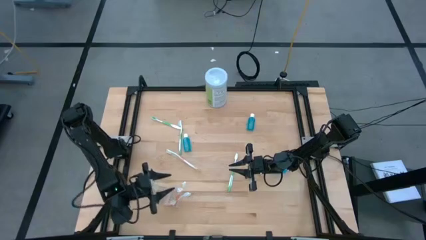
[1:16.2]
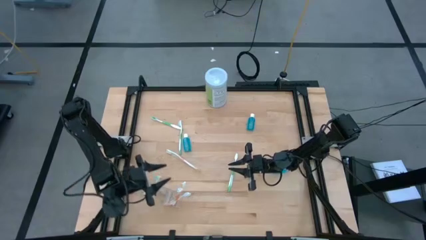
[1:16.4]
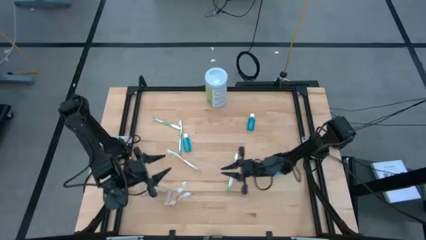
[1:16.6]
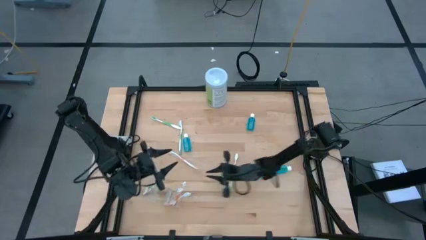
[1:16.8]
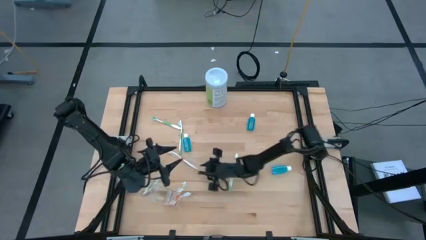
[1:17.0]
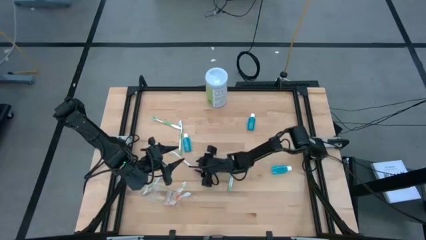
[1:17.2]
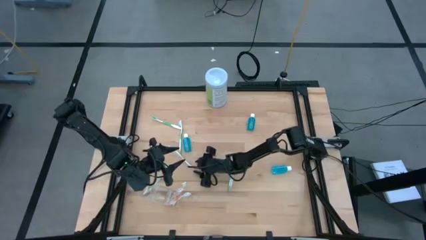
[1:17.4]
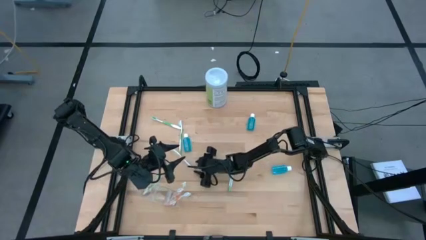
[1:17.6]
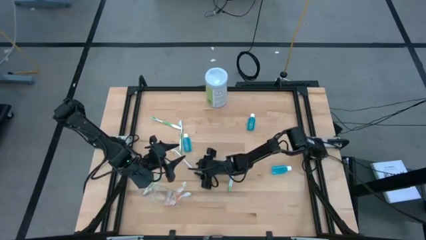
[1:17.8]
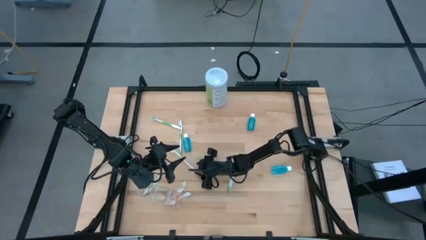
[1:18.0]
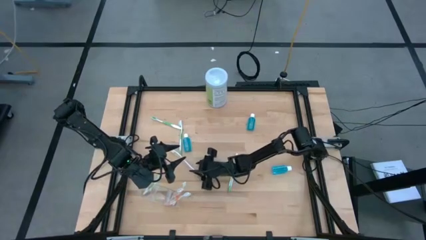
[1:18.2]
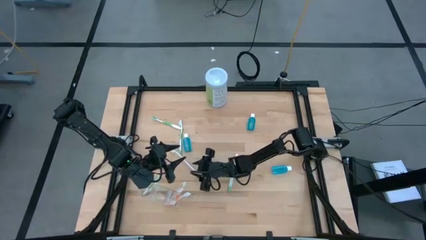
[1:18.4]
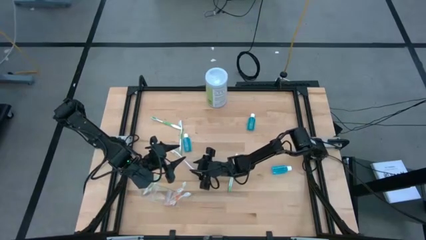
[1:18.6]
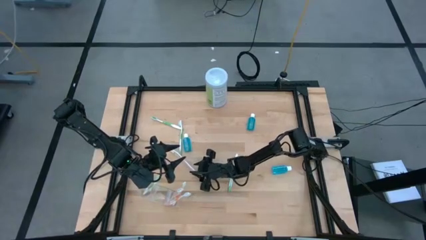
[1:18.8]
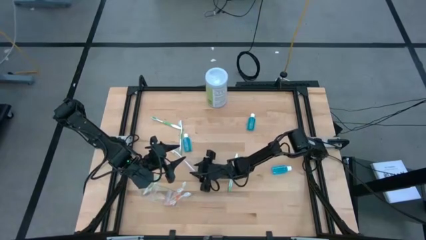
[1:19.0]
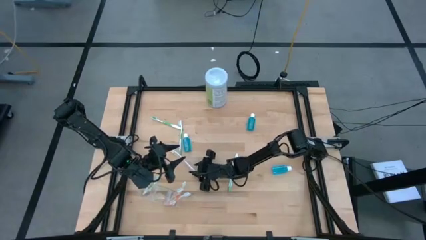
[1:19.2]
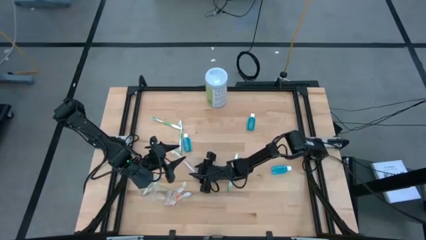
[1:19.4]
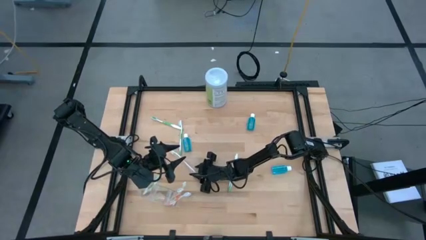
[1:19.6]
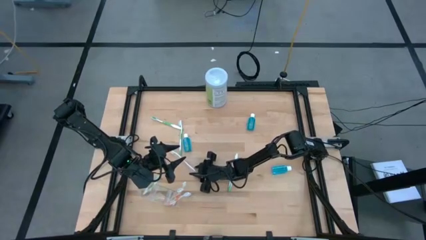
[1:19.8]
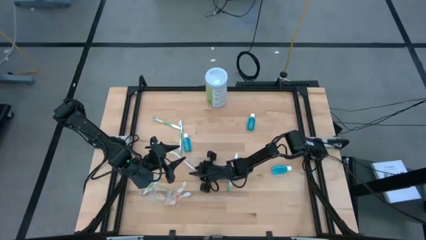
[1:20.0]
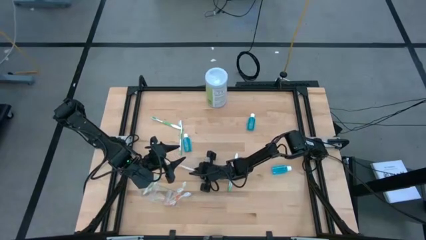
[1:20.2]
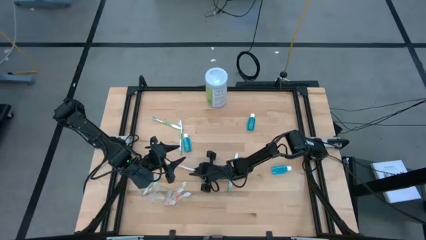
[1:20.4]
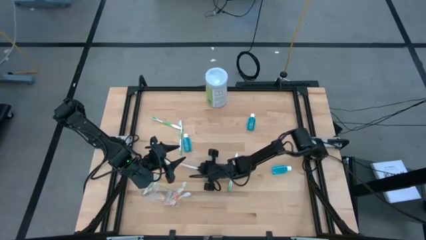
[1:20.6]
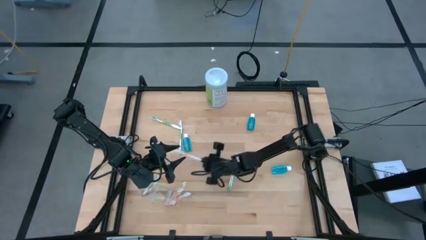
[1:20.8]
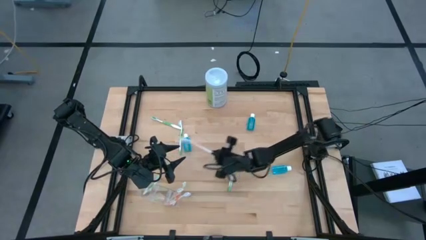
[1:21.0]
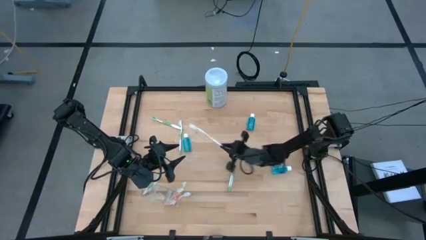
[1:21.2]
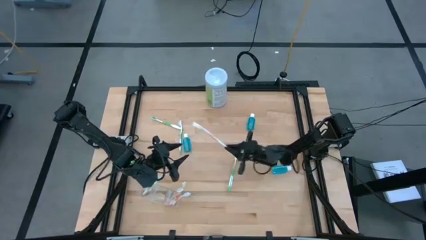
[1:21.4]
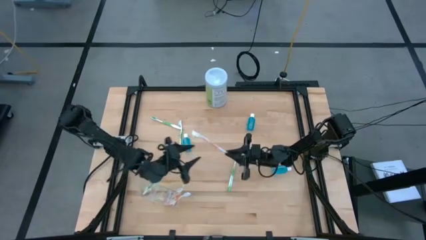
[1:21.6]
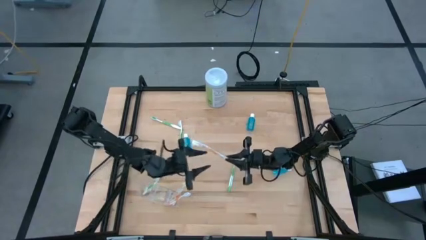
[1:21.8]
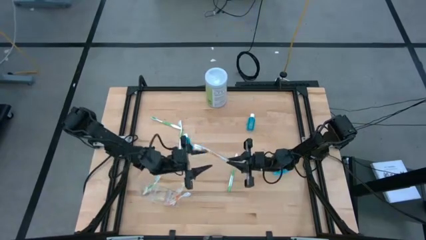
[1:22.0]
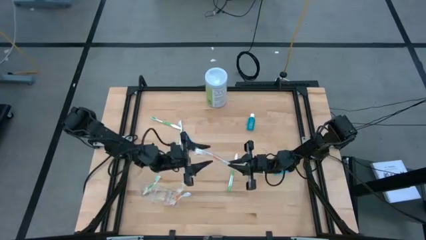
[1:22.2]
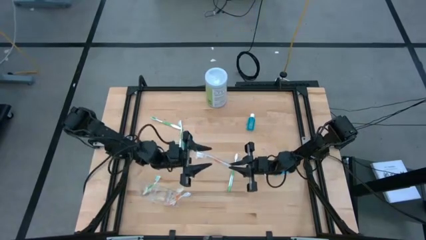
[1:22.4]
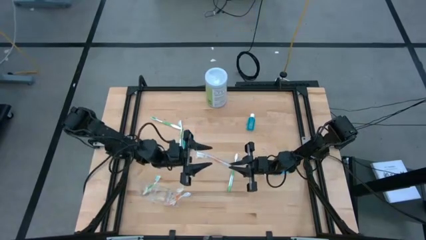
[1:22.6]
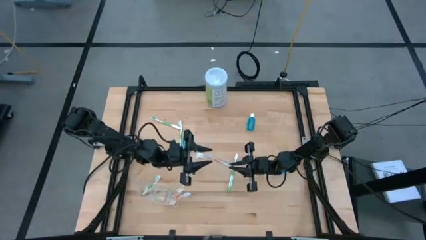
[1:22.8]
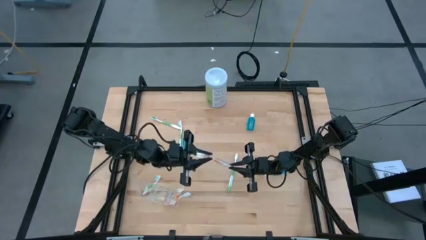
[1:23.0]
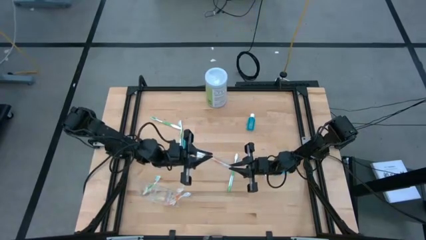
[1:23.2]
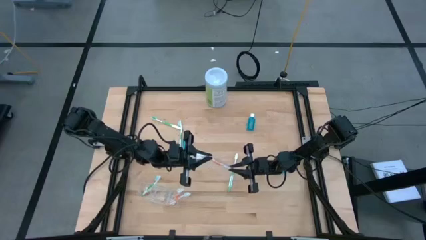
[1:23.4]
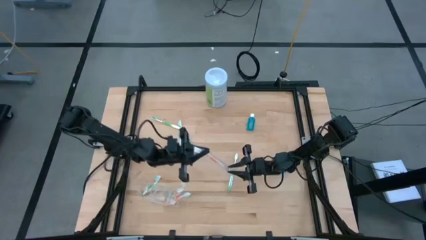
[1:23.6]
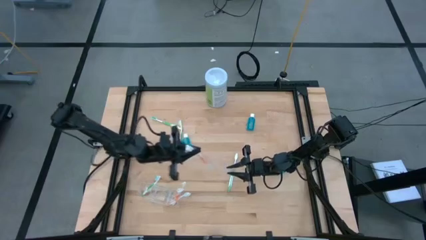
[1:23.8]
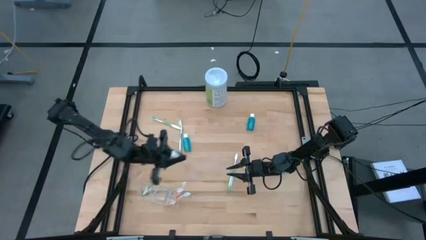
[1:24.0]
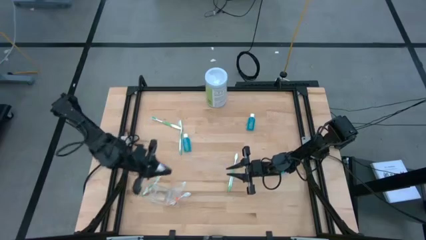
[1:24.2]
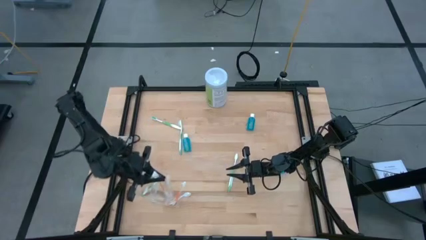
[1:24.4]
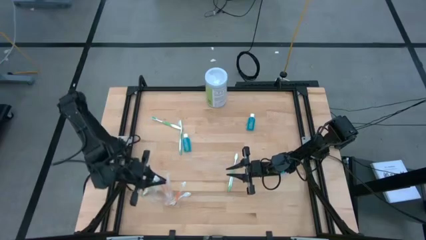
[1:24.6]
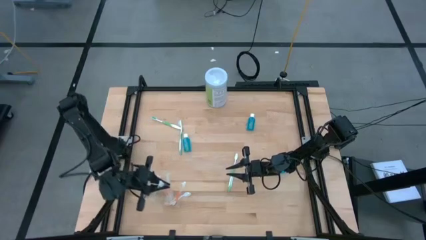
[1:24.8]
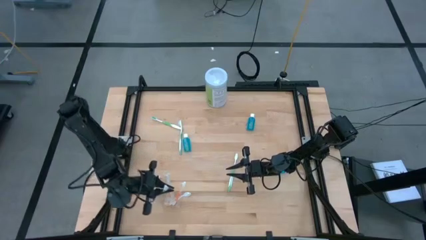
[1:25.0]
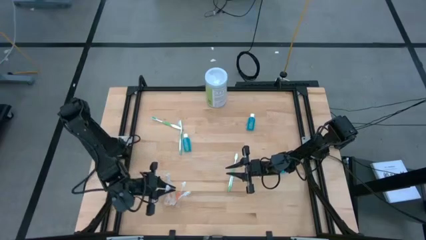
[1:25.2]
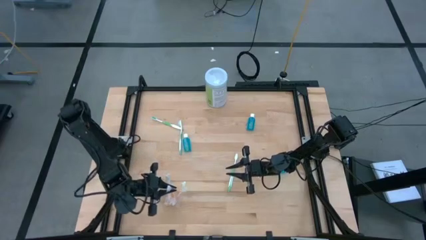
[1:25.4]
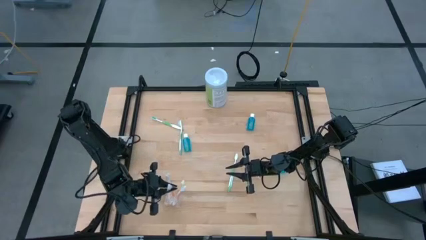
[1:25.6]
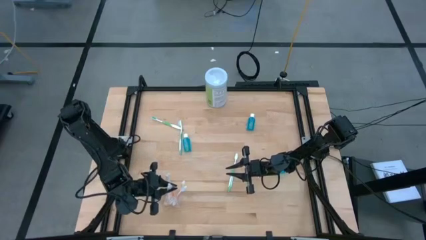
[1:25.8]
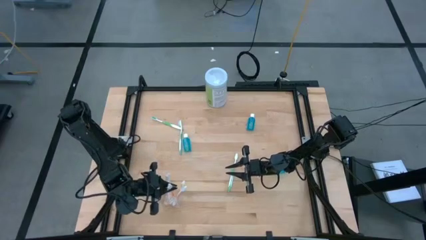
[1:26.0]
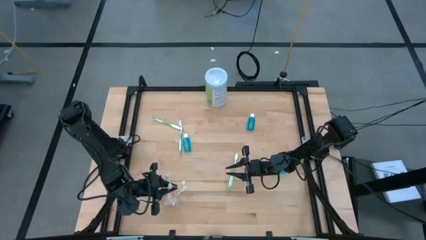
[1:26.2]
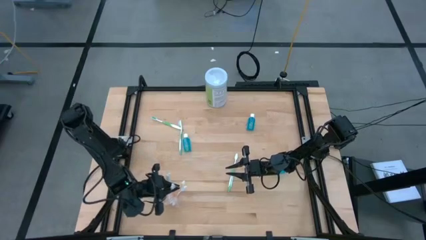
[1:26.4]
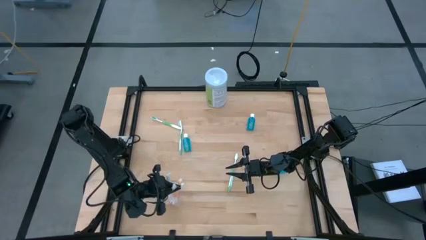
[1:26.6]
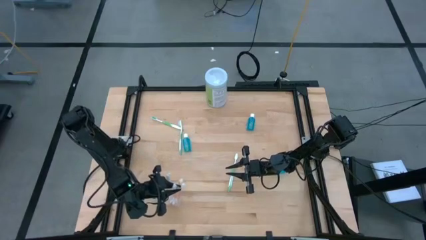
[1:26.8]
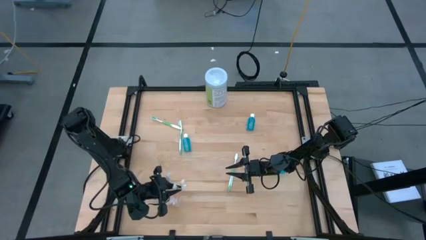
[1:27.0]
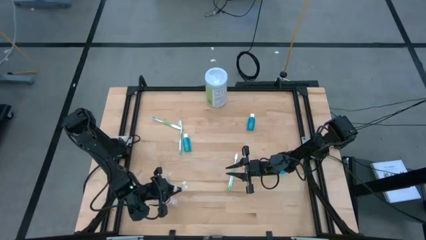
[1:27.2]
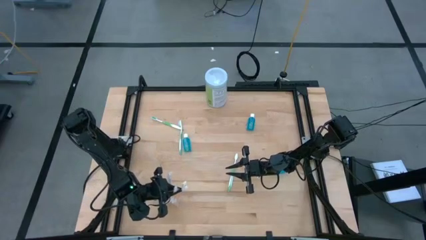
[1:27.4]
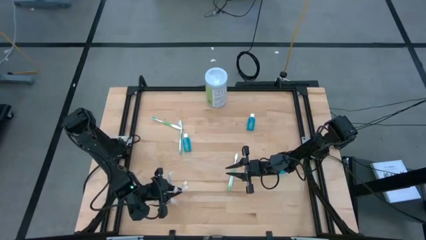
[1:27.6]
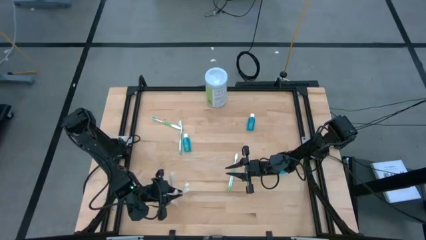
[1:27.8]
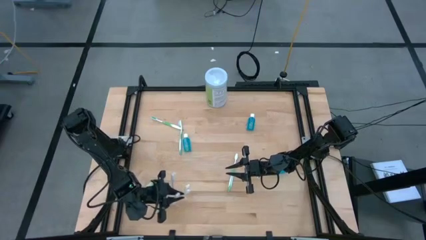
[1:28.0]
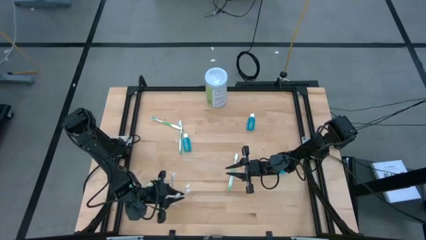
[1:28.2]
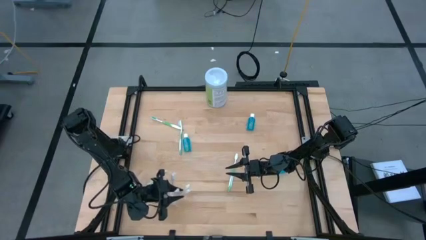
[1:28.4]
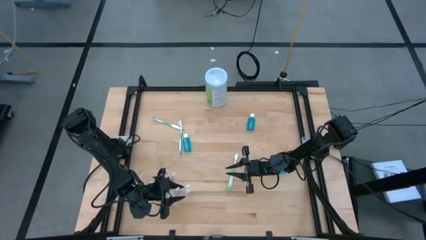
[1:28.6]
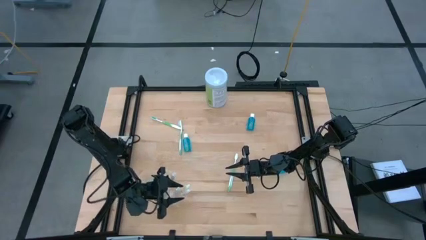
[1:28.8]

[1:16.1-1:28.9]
Task: Pick & Place toothbrushing station
Put the orange toothbrush into the transparent organizer

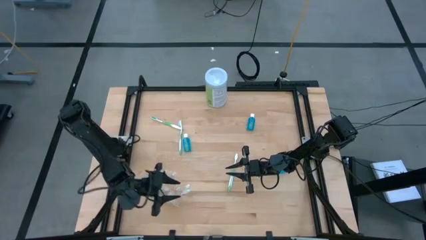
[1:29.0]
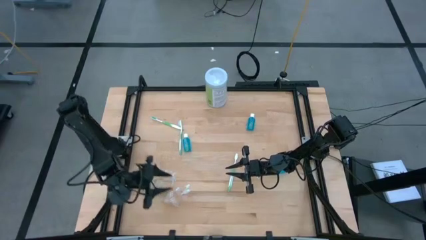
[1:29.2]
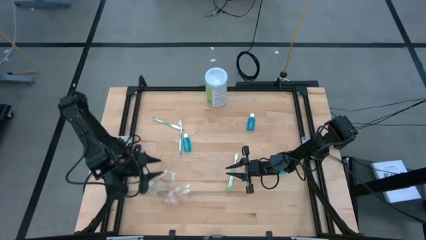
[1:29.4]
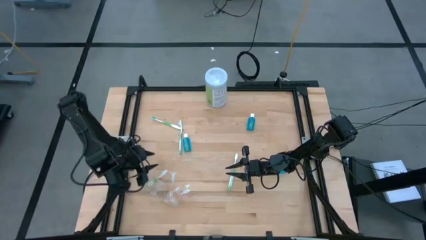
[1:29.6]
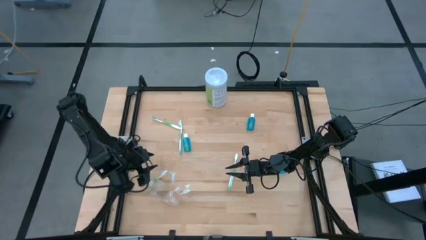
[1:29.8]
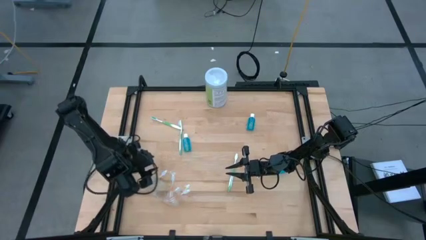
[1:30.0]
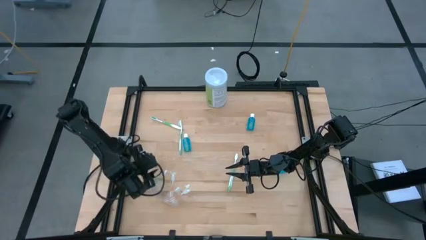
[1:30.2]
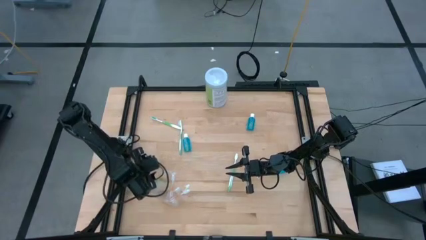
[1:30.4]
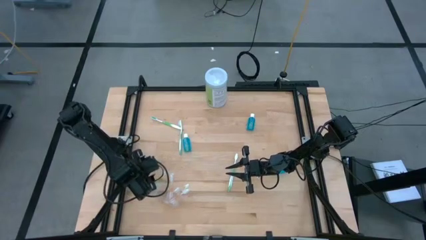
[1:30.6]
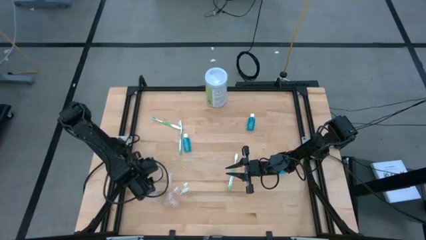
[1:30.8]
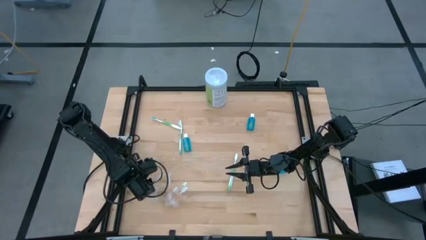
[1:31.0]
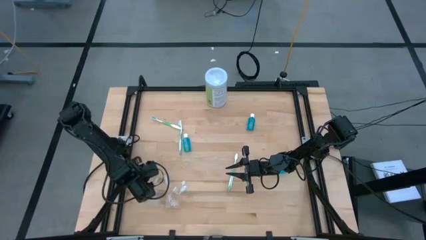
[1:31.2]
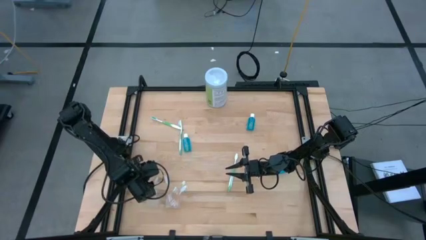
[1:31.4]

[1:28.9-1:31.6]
Adjust the transparent organizer
